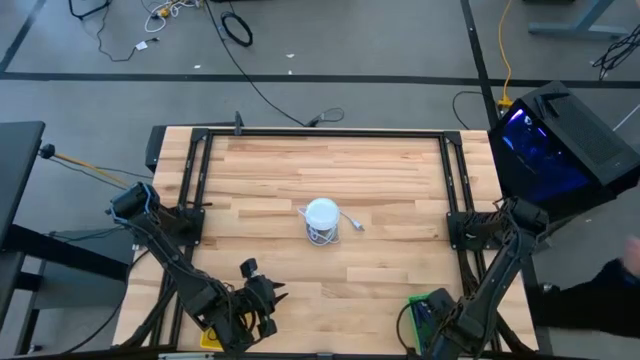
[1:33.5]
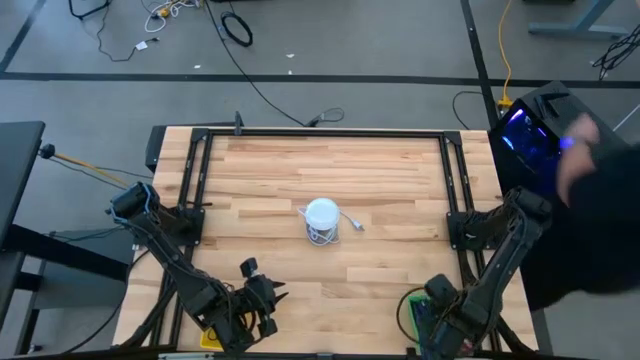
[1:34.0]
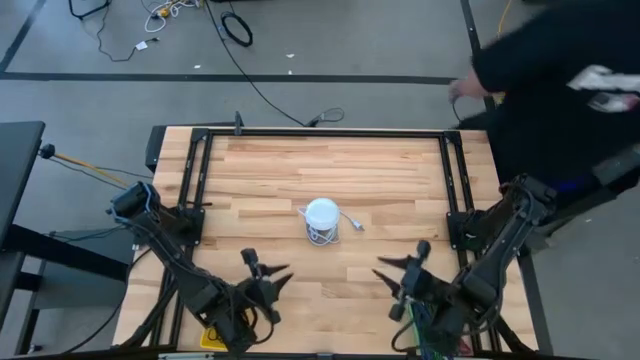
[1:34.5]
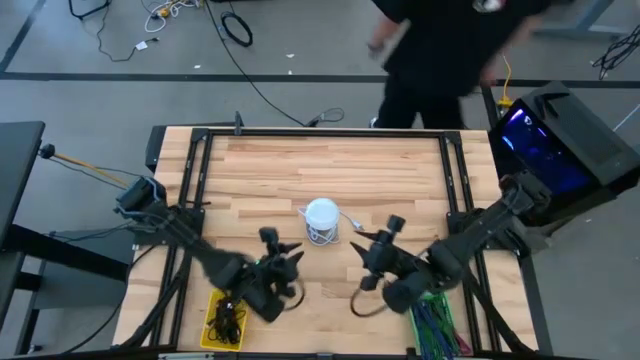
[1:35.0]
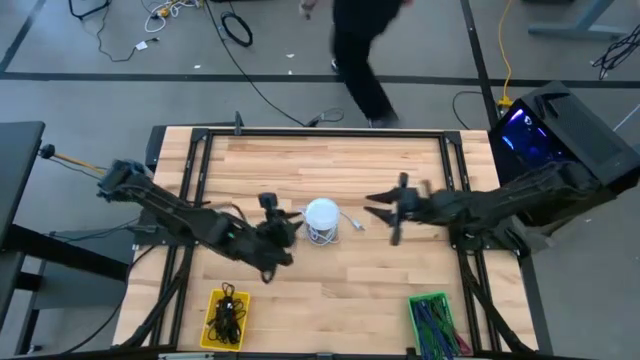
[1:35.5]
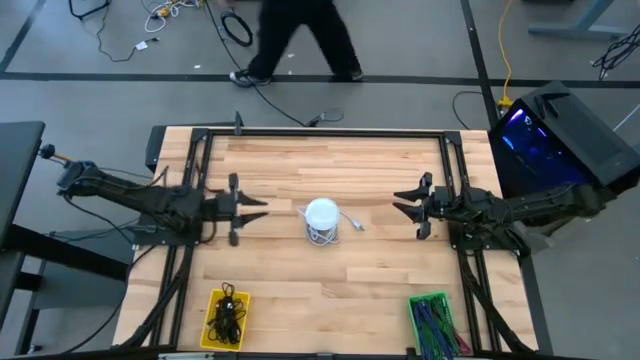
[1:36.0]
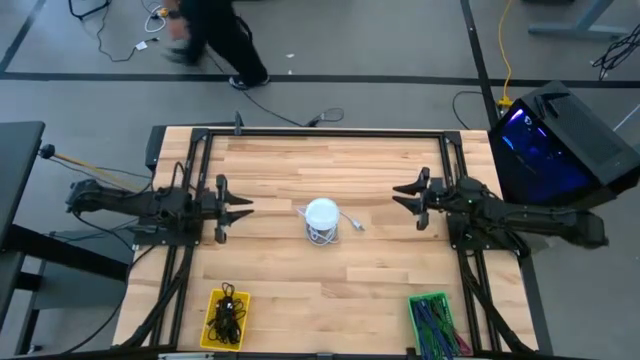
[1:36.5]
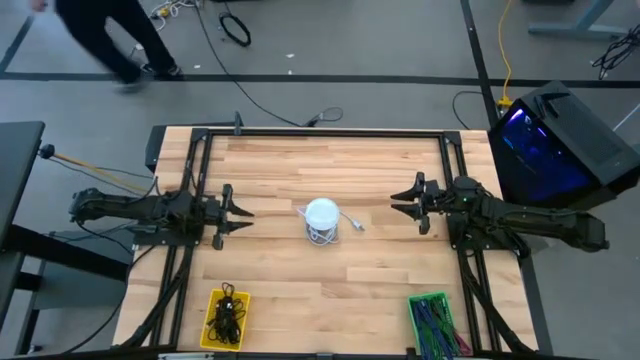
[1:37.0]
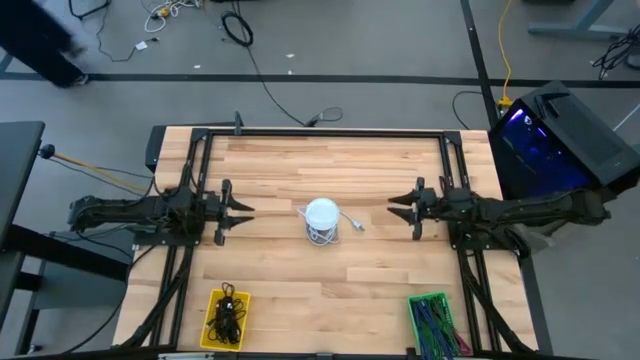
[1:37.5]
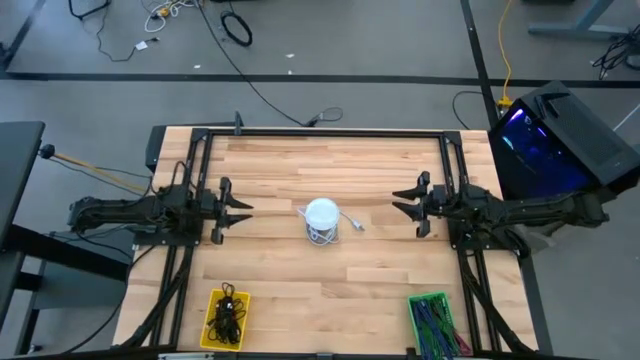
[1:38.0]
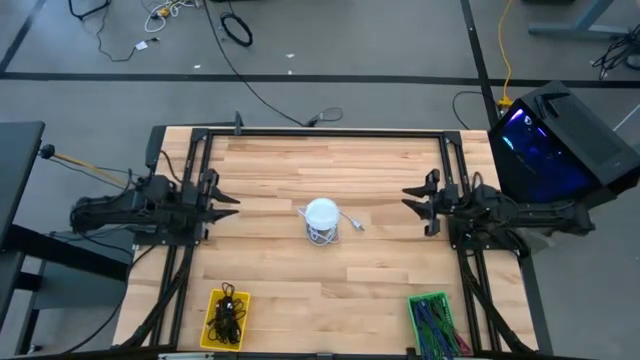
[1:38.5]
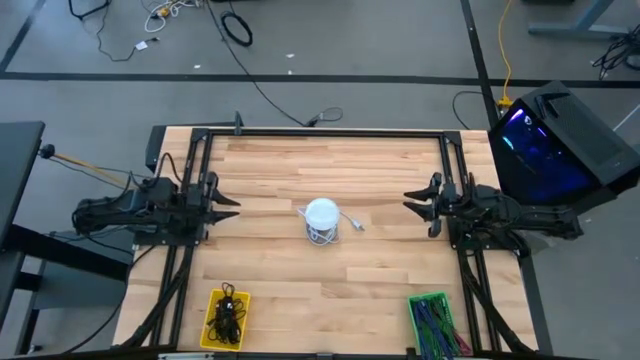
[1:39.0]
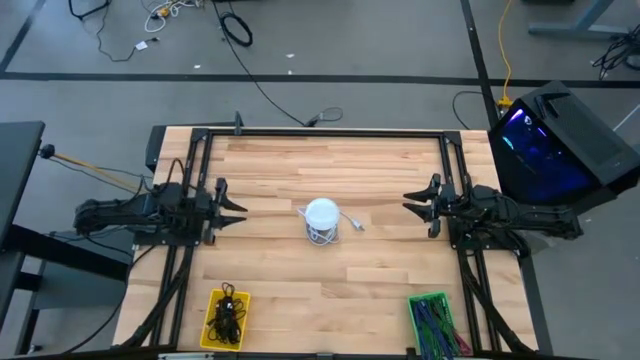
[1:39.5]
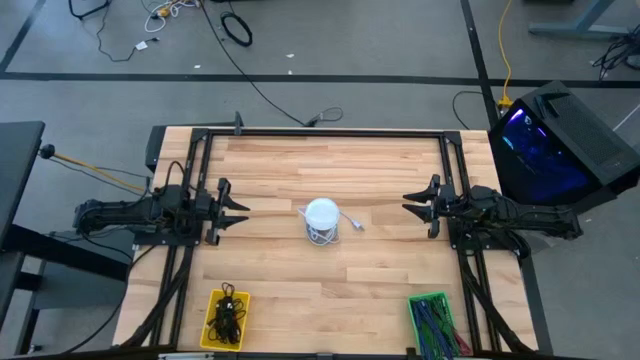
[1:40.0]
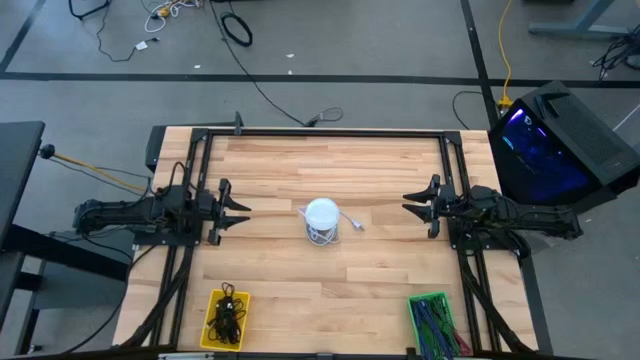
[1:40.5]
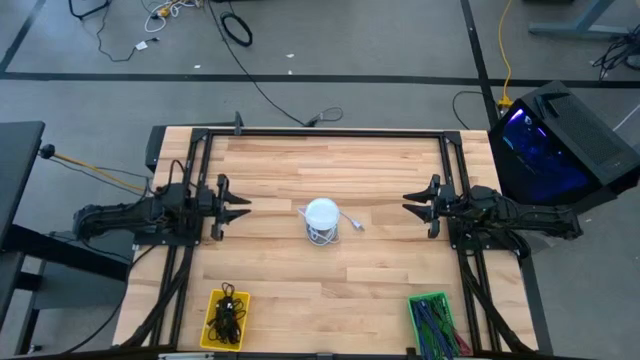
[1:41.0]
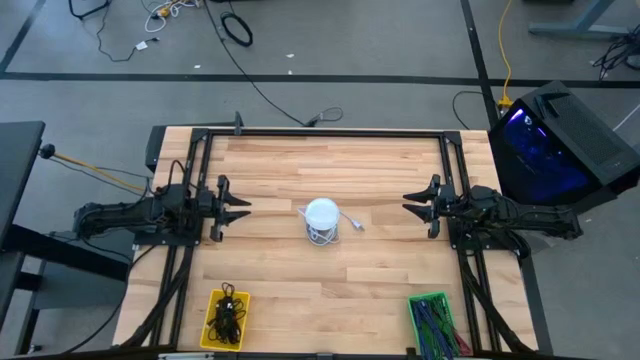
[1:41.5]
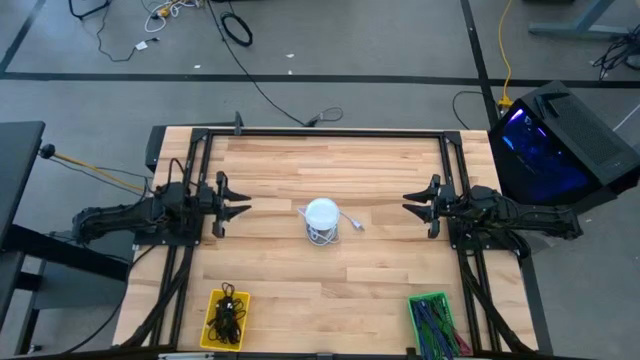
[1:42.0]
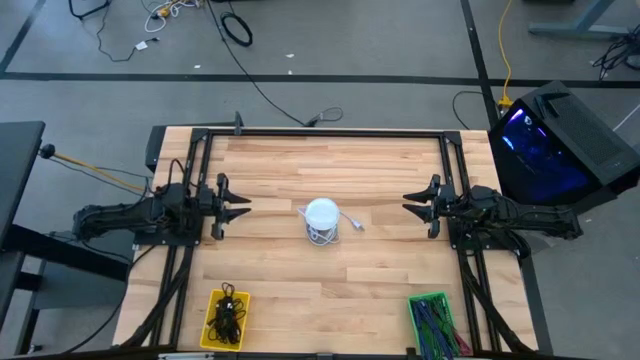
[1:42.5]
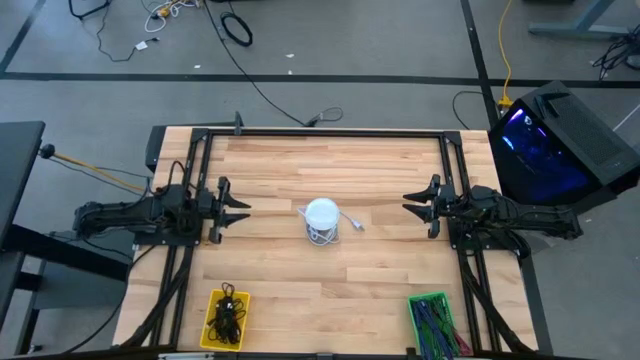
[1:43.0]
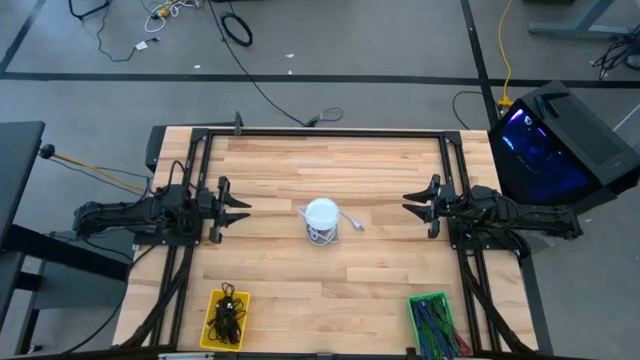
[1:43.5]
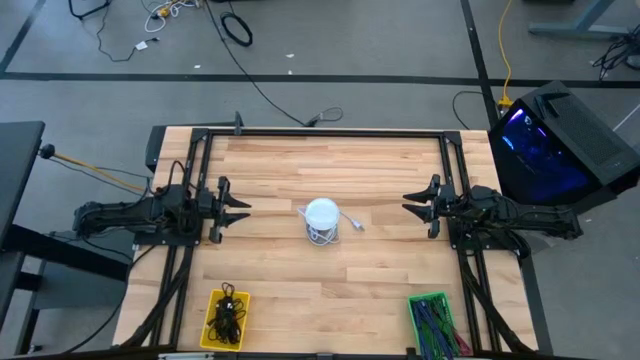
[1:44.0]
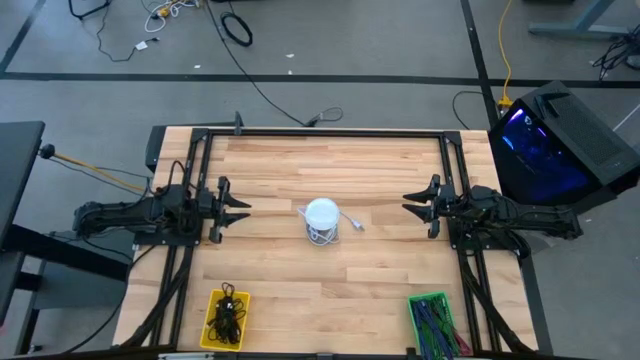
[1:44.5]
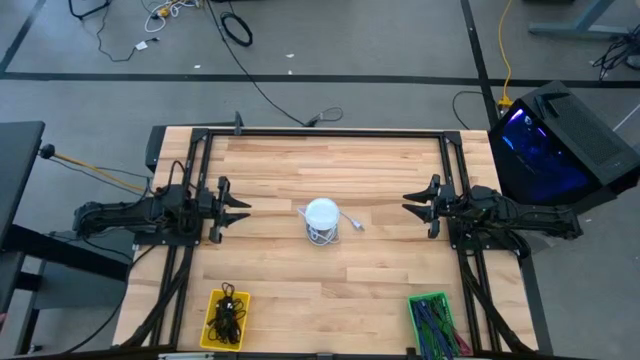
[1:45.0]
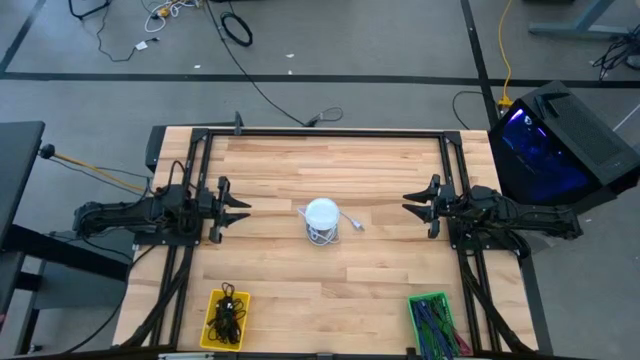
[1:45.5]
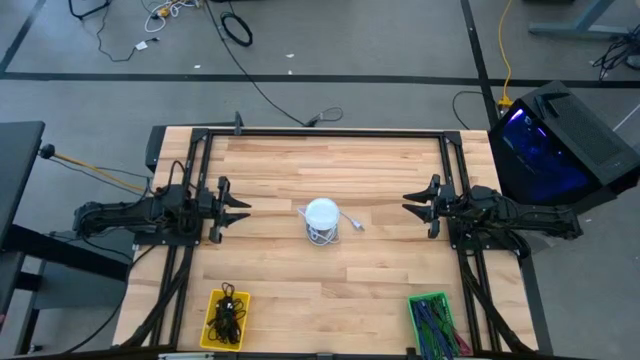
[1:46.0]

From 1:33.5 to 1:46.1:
Task: Pick & Place USB Port
Return to Home Position

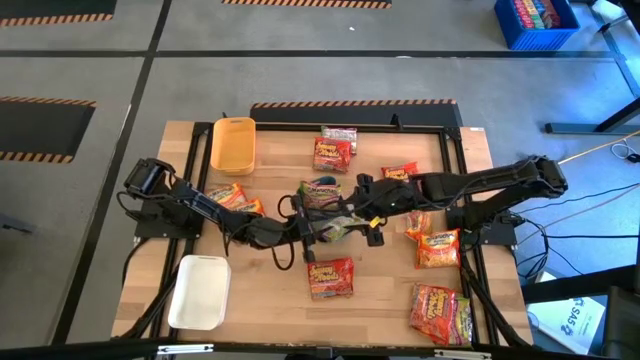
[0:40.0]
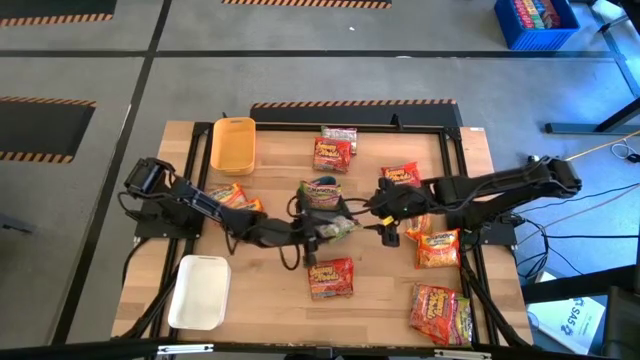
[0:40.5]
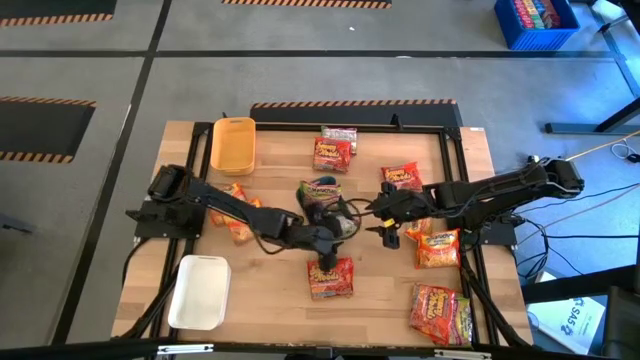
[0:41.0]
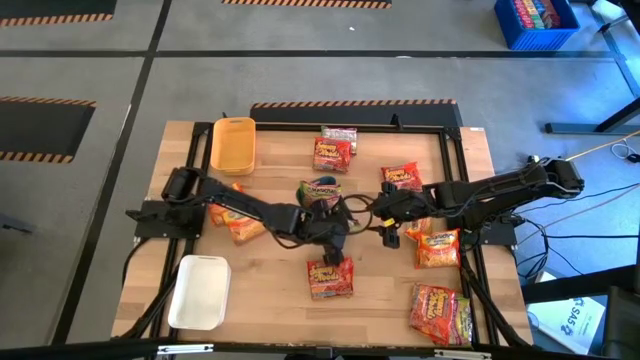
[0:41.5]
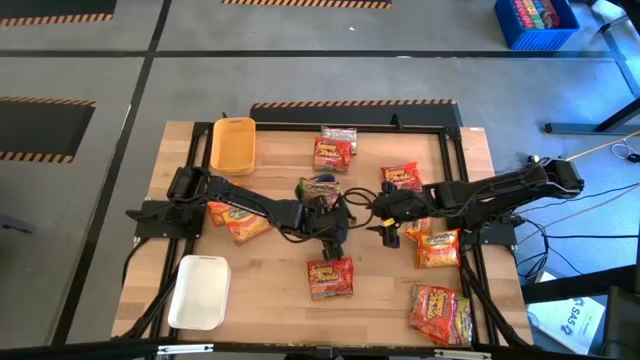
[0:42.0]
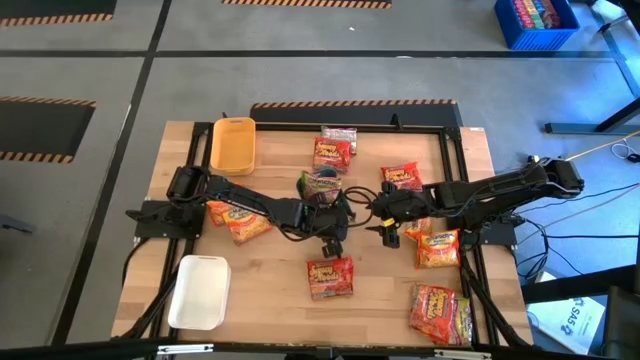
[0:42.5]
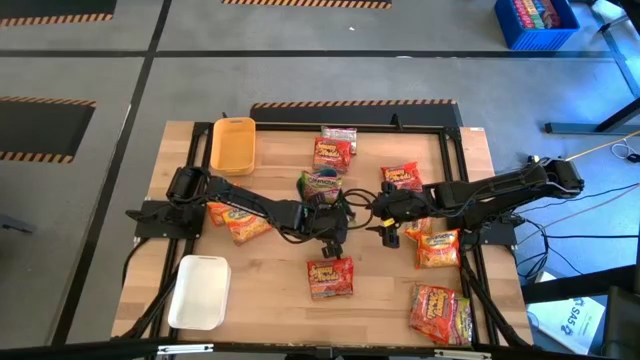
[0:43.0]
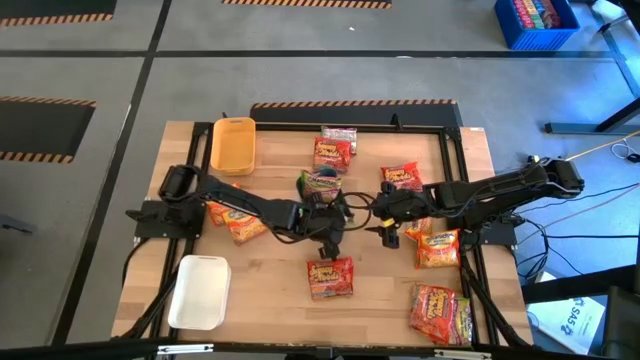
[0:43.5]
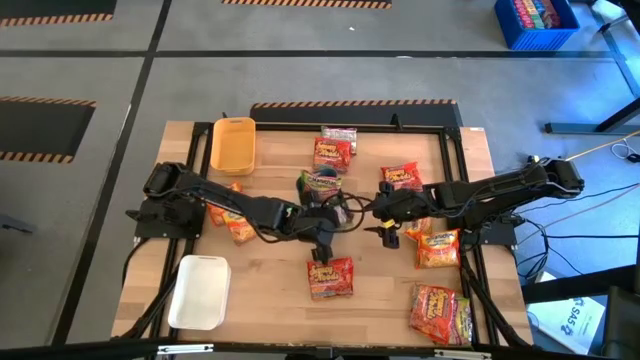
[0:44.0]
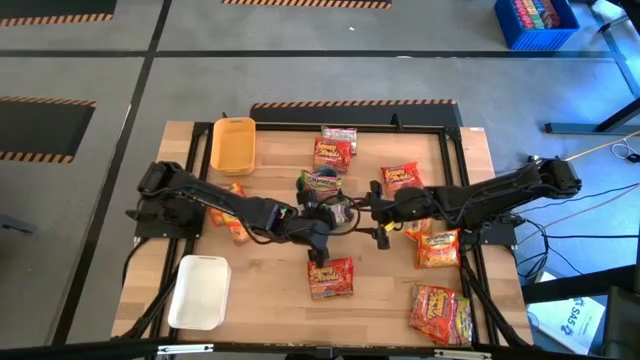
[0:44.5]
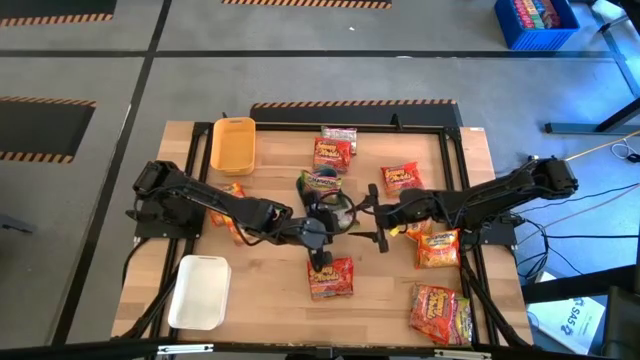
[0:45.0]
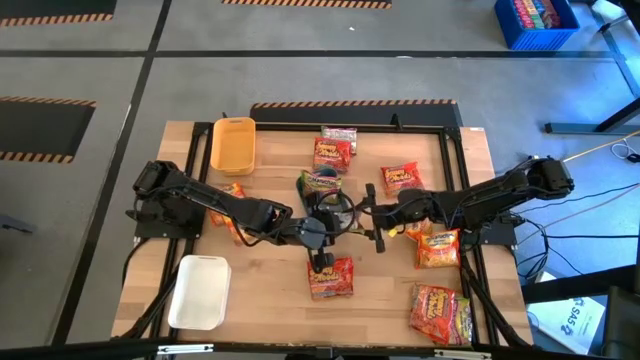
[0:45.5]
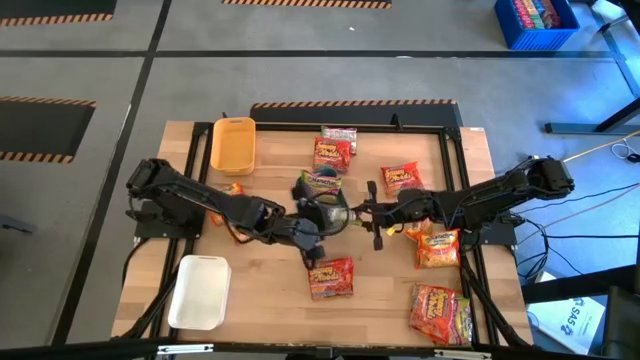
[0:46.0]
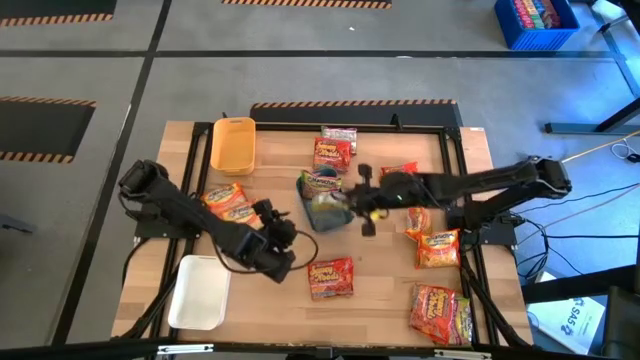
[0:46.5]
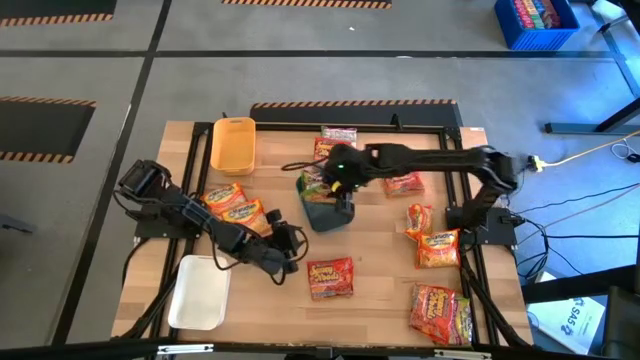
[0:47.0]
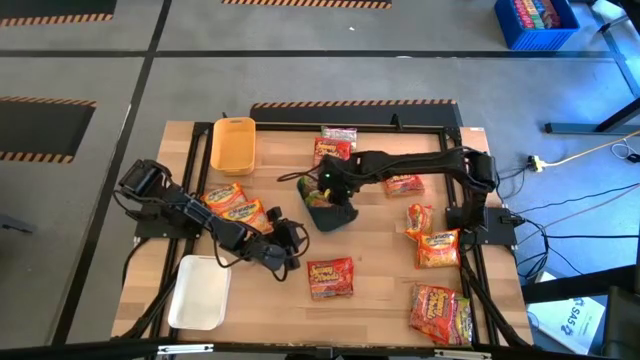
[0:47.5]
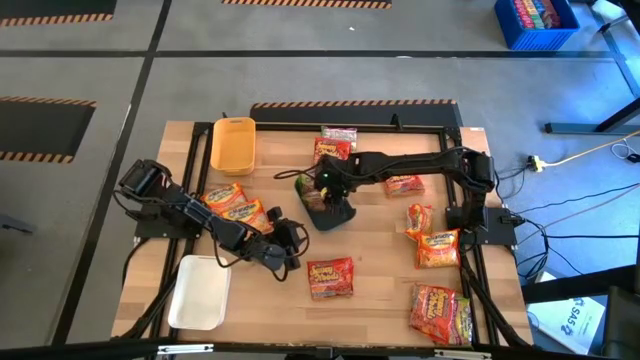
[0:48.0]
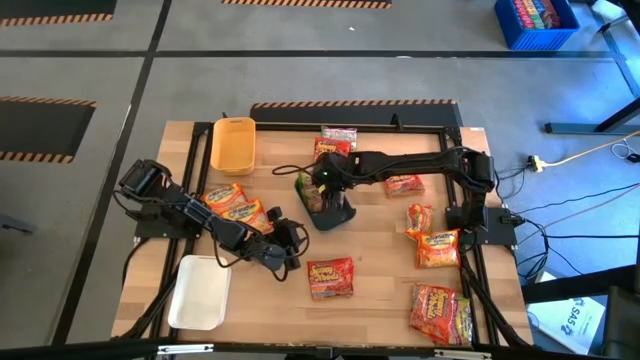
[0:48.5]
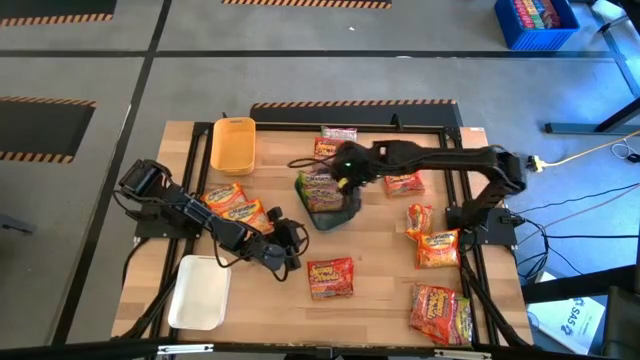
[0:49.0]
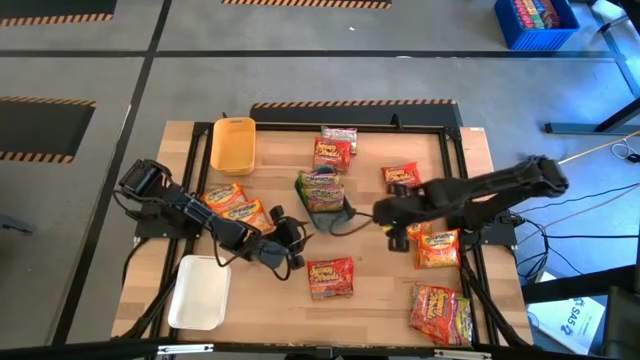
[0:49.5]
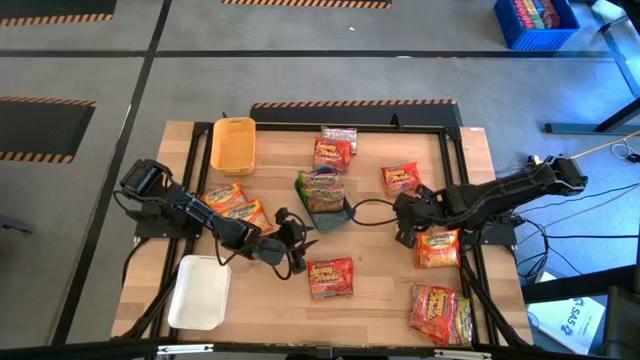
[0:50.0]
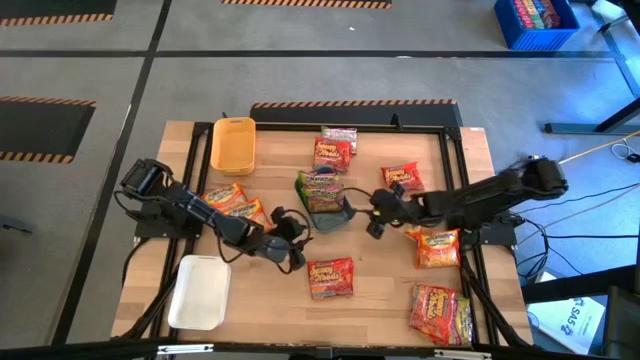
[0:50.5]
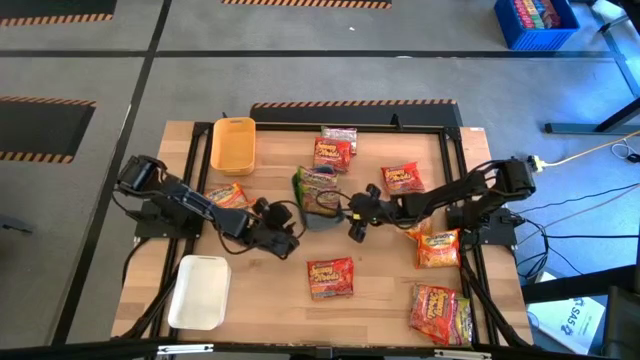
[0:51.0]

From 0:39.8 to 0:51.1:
Task: Sort Maruchan noodles
Put the green noodles into the blue bin
